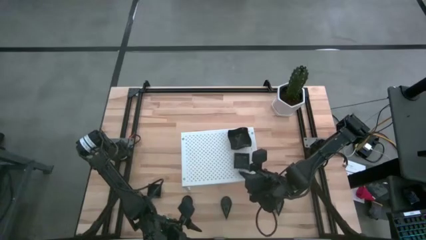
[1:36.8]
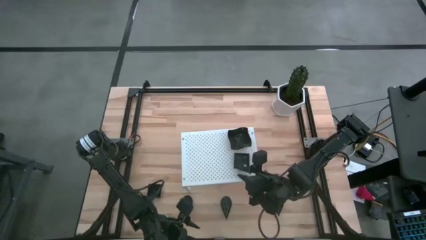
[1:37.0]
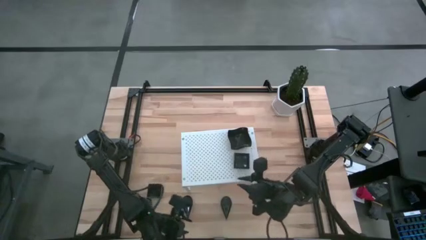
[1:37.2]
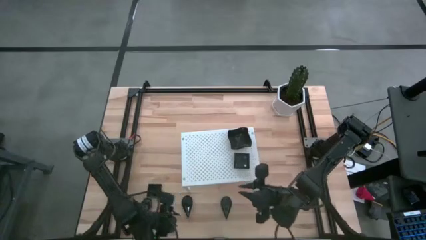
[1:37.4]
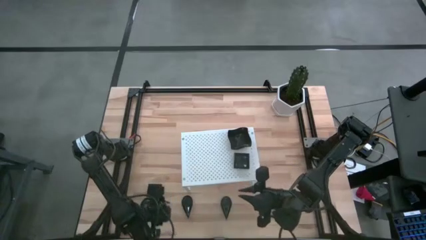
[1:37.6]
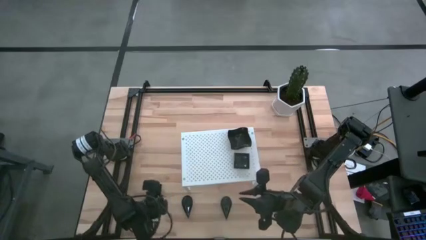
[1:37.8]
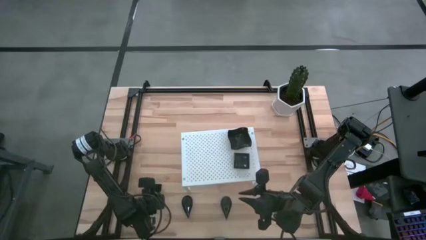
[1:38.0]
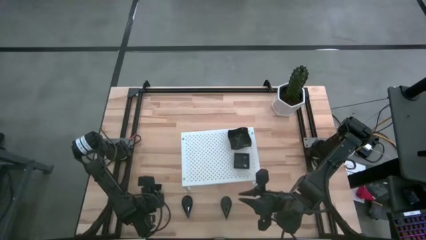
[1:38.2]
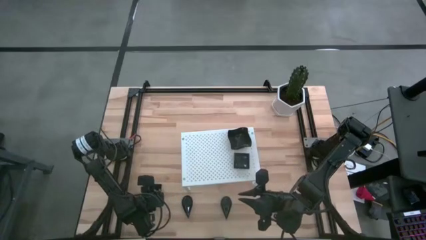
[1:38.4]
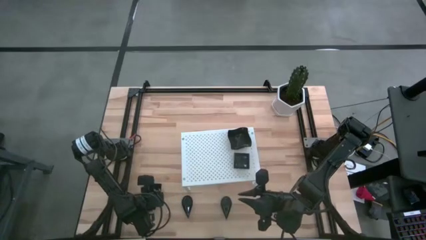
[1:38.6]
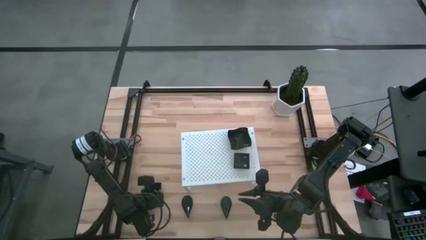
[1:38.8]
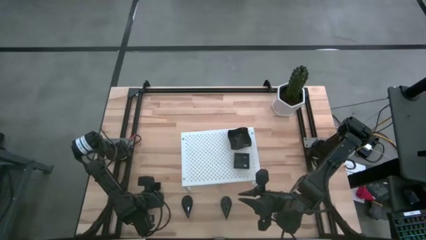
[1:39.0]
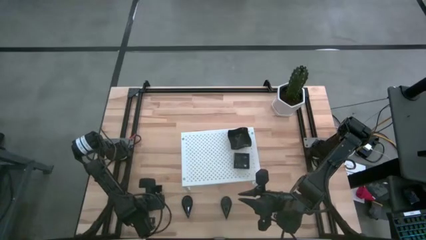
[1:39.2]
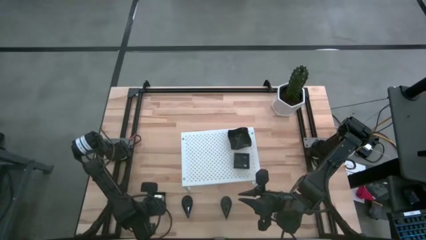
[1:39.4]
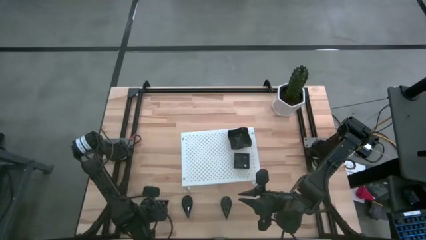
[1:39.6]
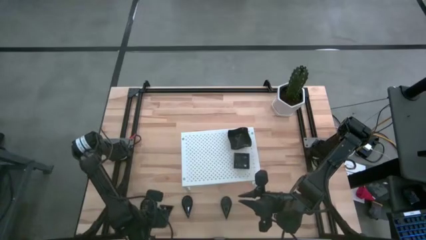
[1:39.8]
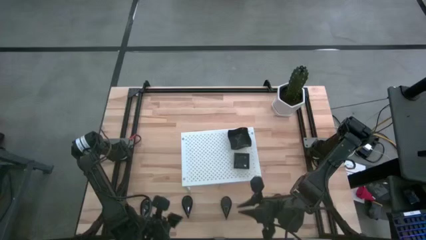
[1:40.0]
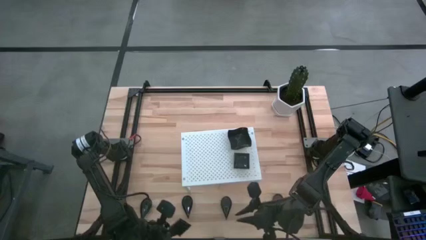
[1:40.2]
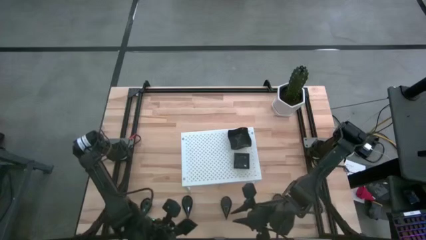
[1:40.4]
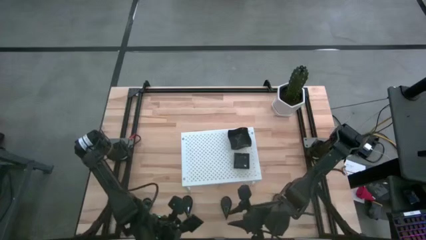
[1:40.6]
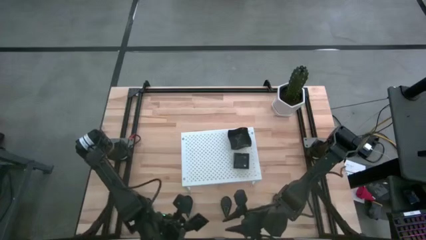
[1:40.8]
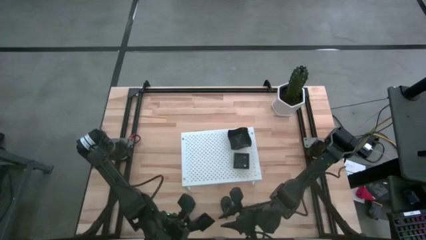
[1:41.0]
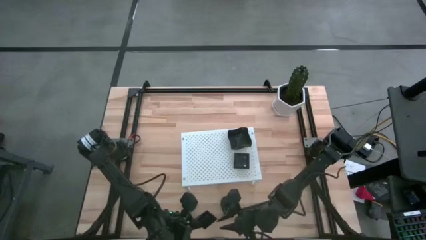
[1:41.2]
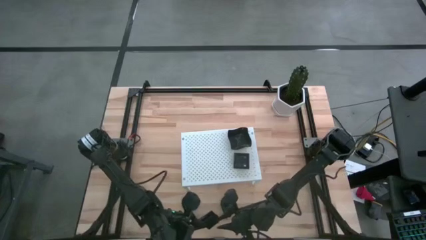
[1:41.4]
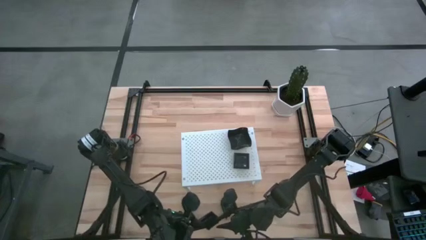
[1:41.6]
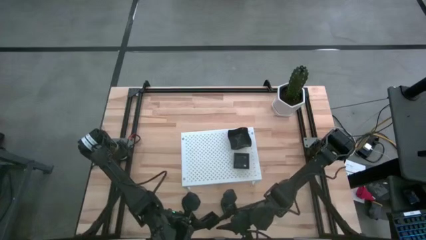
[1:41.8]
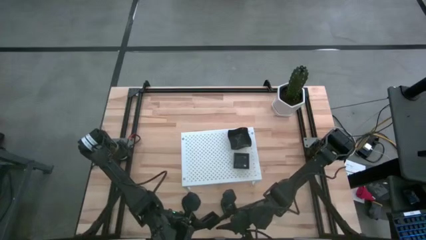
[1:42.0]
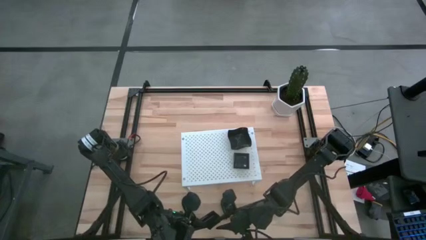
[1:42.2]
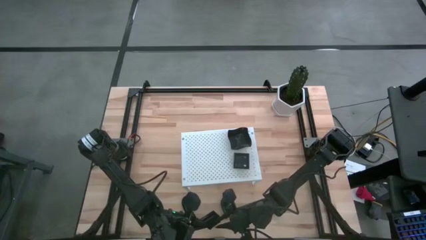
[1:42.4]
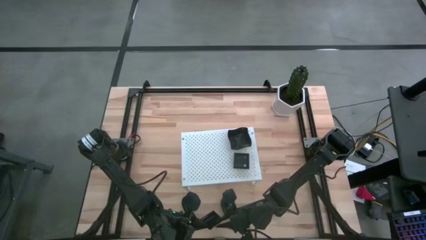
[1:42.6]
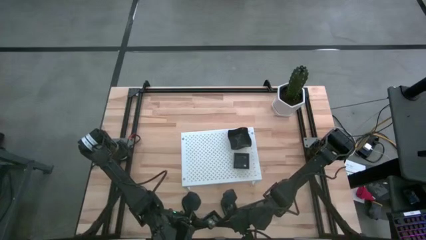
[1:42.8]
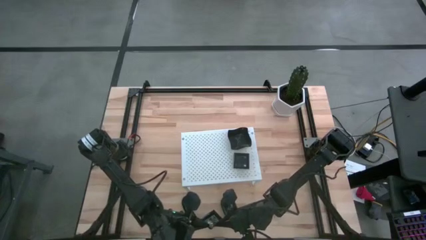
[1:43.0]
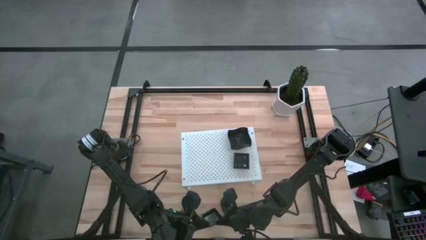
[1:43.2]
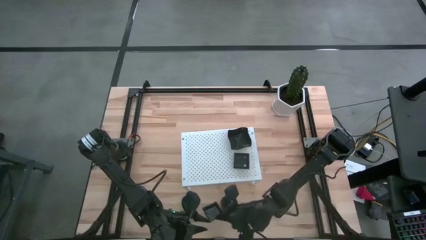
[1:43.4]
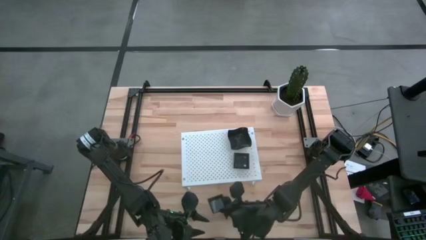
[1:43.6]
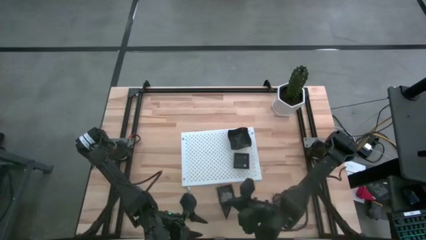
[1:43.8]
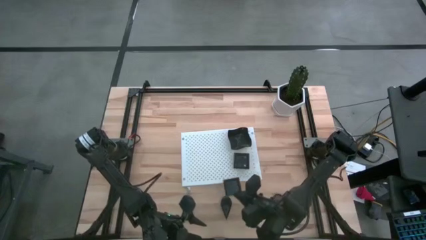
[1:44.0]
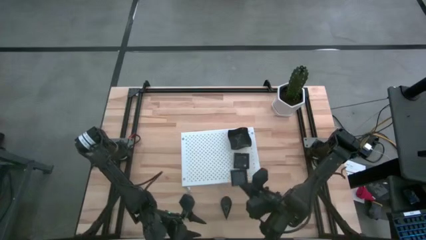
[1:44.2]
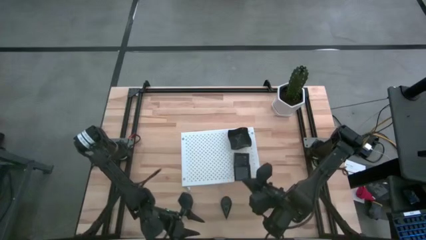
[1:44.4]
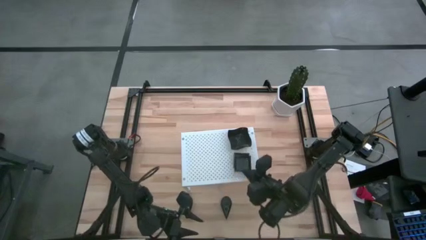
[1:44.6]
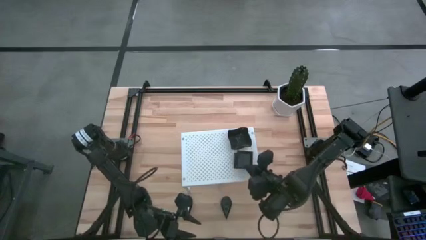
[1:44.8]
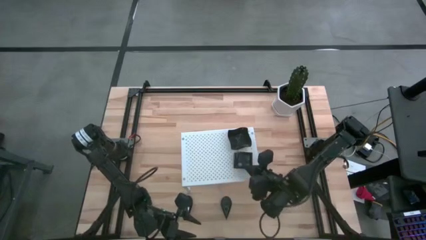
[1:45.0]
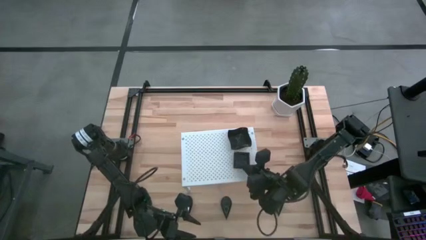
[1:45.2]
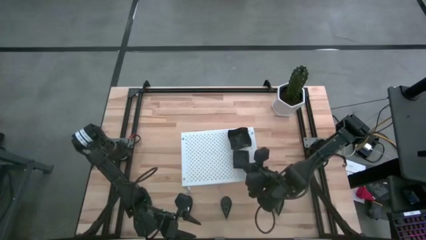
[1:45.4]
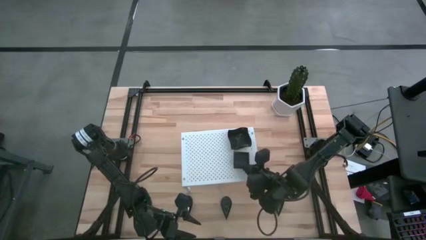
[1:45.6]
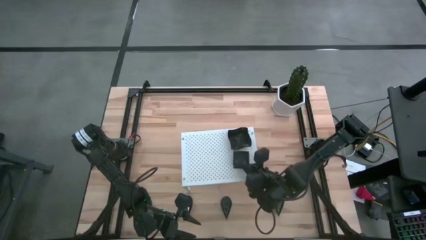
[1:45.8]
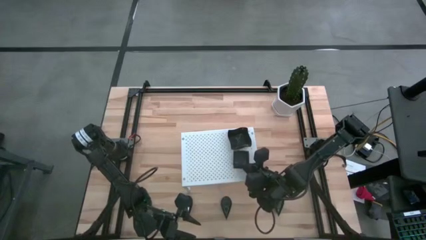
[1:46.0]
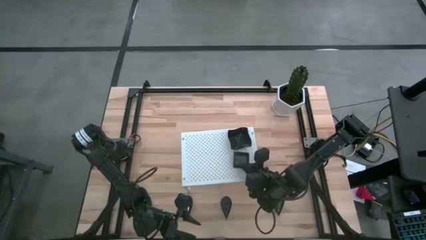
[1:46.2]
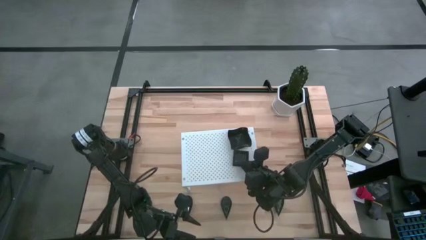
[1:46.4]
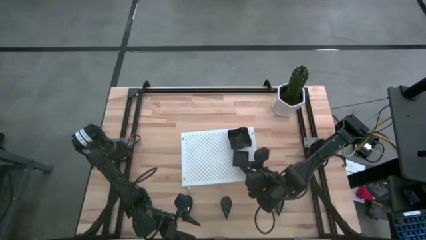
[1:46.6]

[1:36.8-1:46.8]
Task: Pick & Place Mini shaped plates
Stack the square plate on top of the other square plate on the shelf

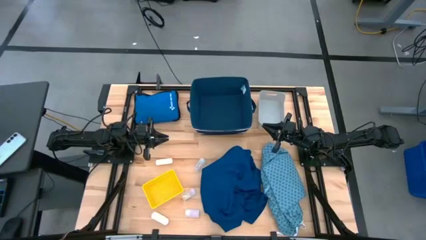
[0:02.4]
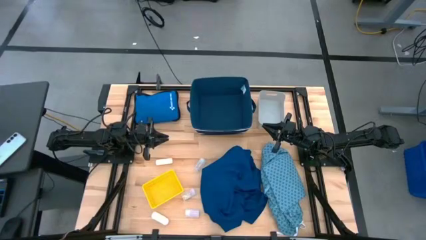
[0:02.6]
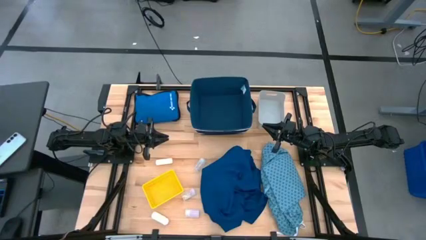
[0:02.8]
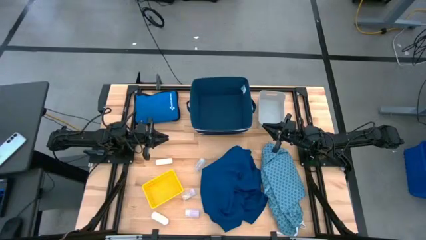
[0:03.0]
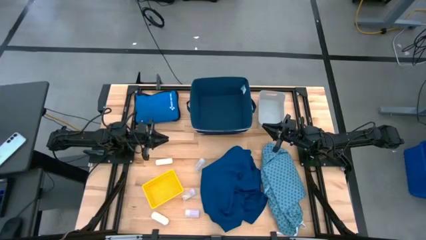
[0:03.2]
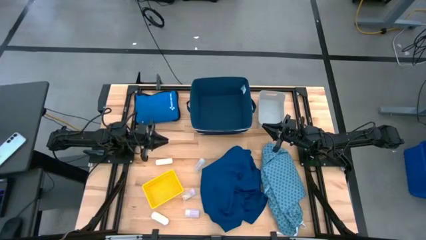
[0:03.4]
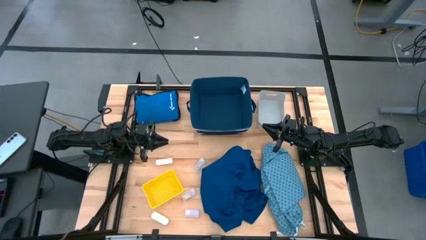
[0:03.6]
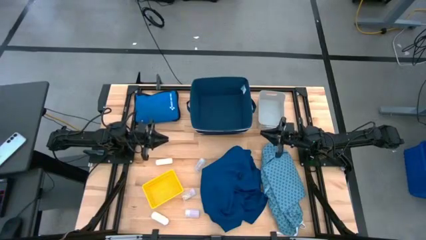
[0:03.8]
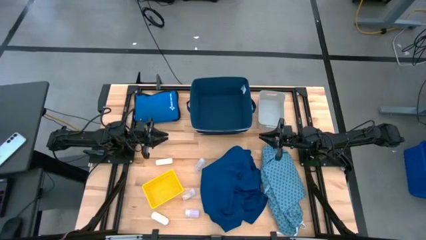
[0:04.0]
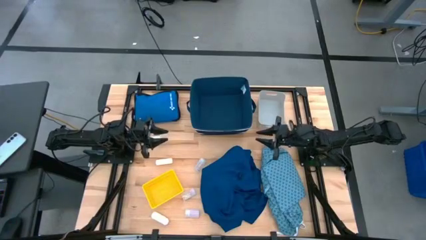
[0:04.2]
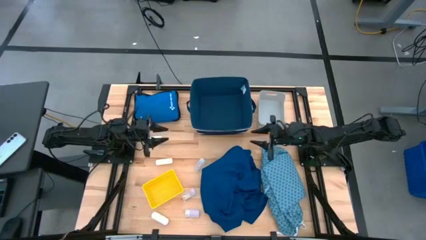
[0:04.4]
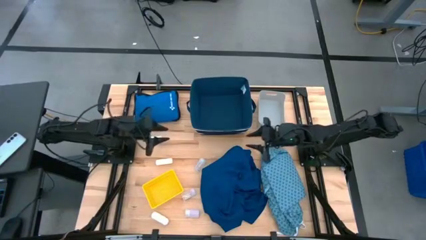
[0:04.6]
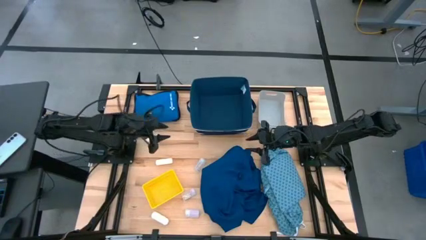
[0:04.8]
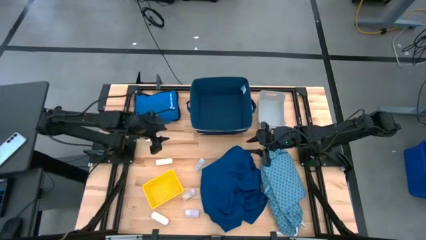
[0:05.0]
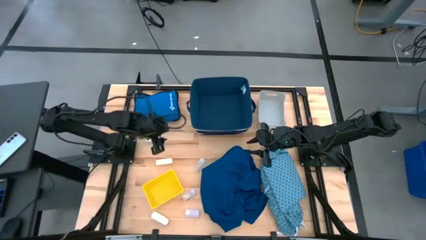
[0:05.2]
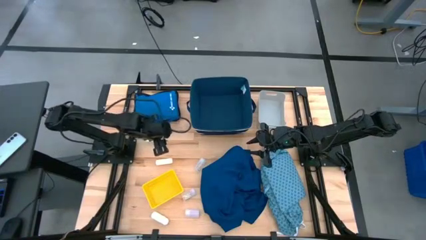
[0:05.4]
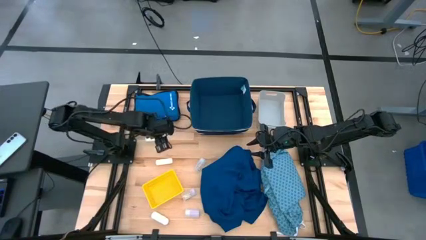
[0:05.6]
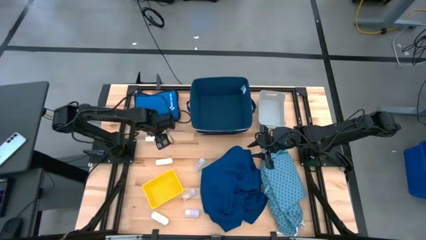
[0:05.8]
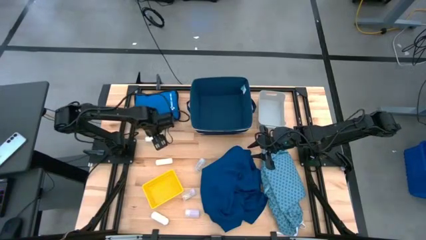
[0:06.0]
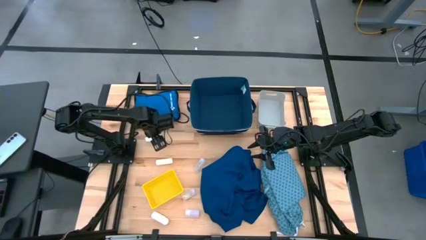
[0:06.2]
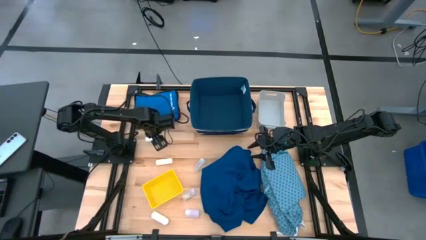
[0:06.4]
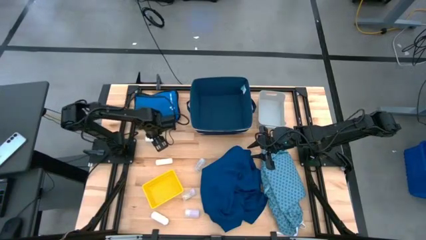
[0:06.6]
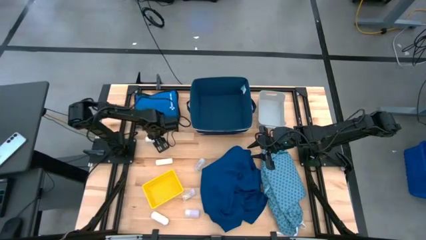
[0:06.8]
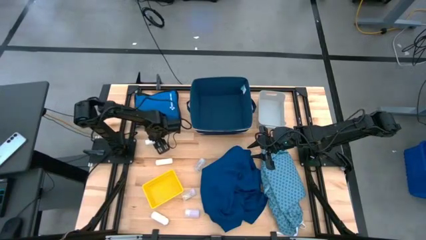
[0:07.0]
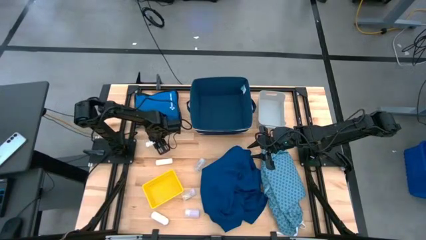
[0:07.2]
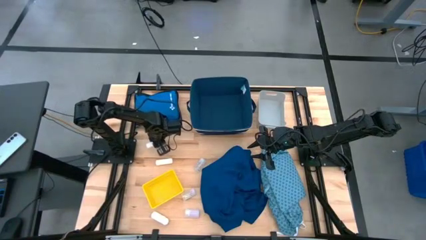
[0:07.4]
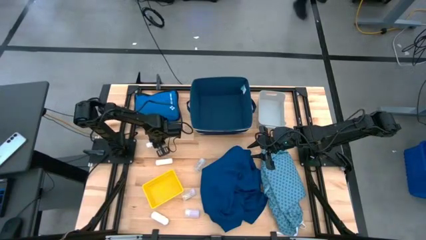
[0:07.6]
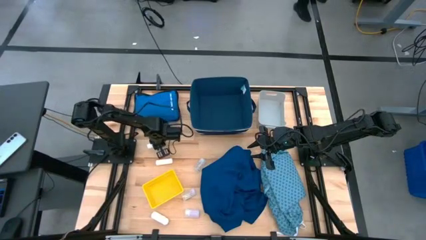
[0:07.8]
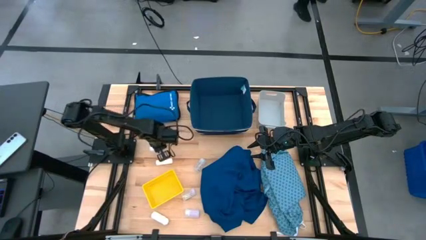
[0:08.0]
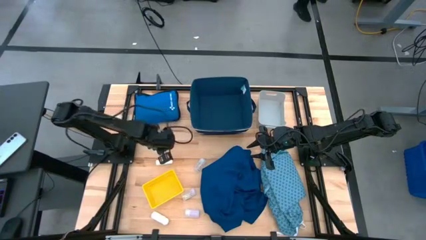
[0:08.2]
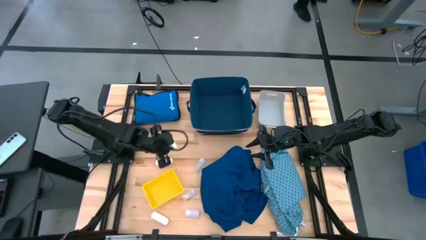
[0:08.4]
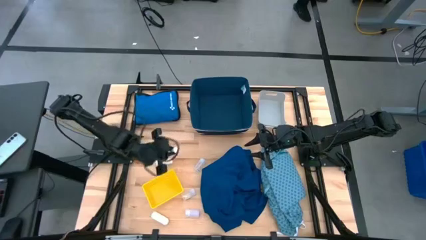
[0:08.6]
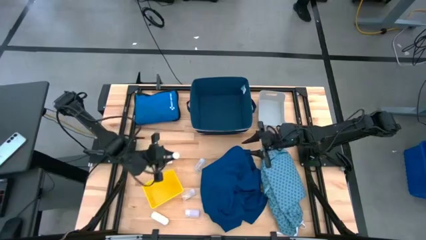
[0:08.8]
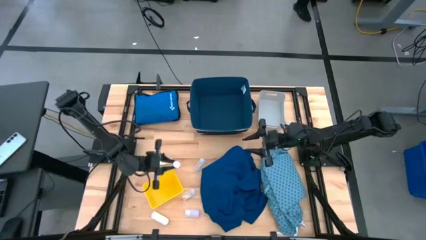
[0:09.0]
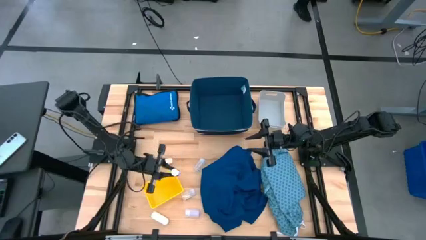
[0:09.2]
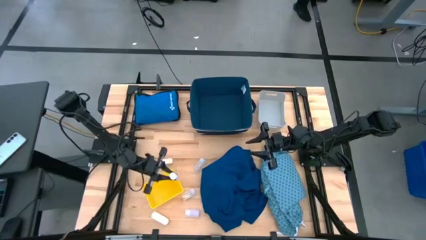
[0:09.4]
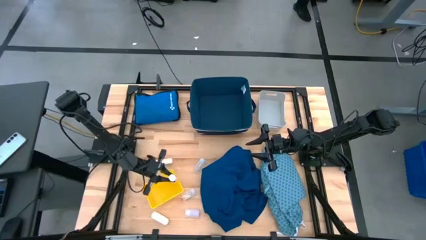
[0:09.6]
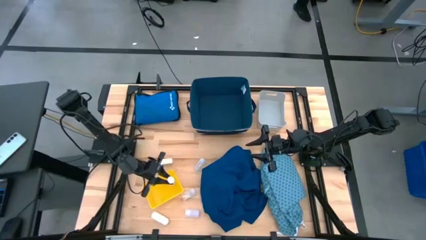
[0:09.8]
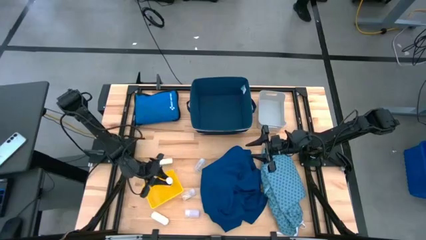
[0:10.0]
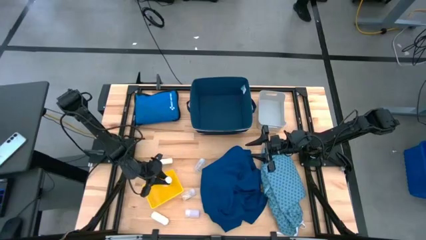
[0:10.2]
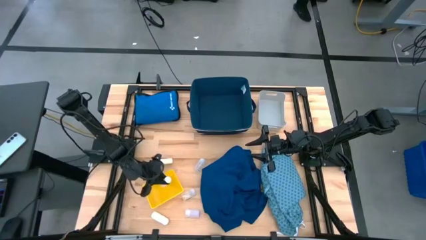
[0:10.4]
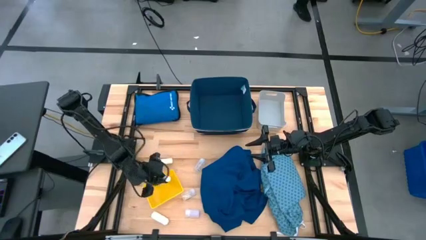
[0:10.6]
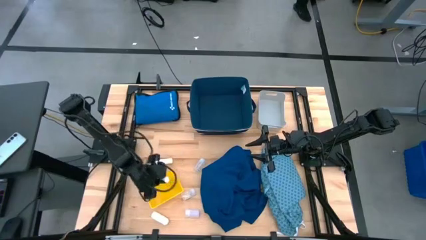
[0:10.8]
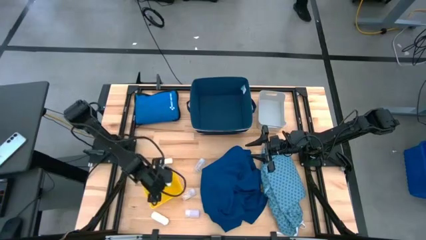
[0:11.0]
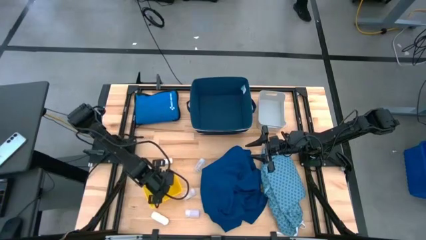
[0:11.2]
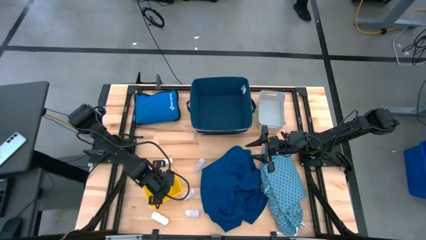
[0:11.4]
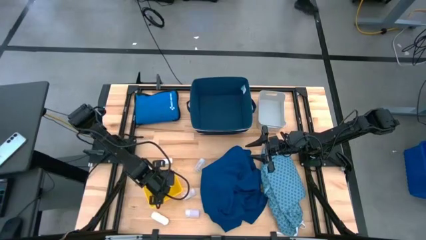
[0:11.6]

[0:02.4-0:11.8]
Task: Pick & Place Medicine items
Put the top left white rolled gauze into the yellow bin
